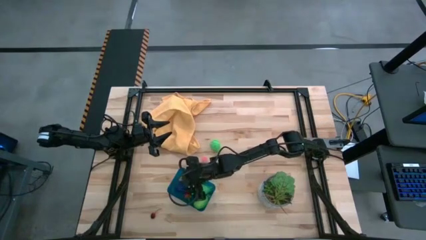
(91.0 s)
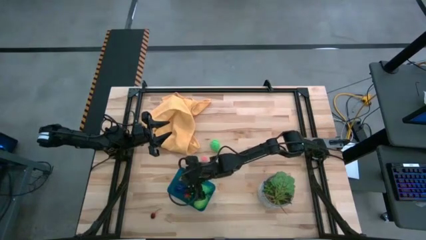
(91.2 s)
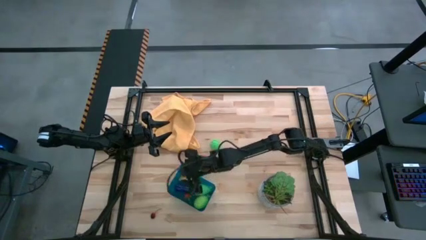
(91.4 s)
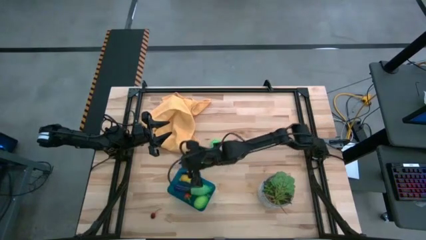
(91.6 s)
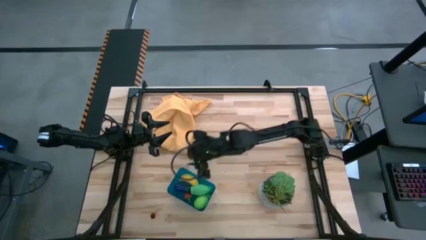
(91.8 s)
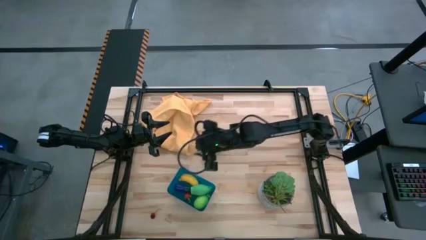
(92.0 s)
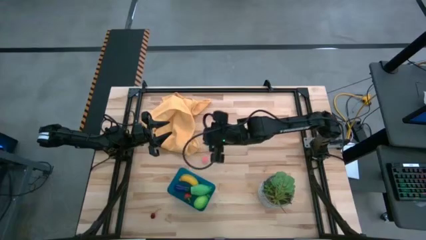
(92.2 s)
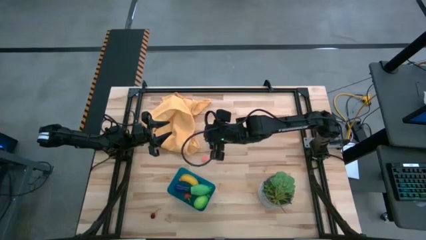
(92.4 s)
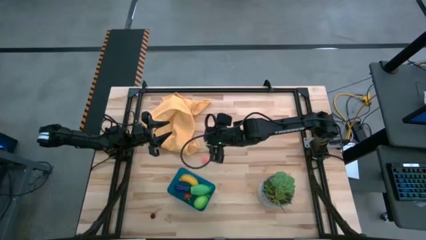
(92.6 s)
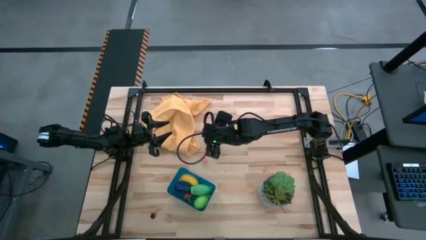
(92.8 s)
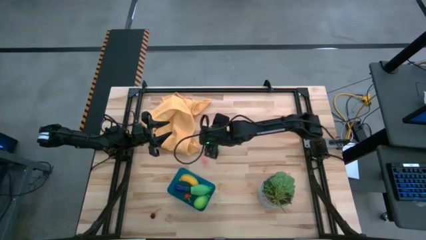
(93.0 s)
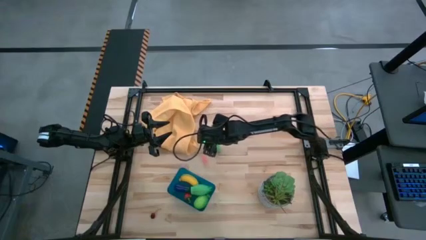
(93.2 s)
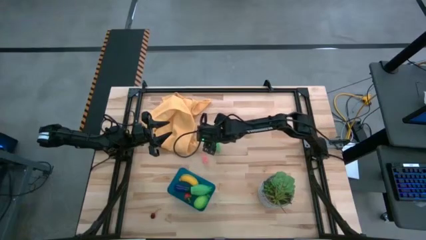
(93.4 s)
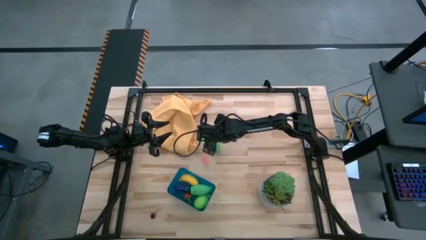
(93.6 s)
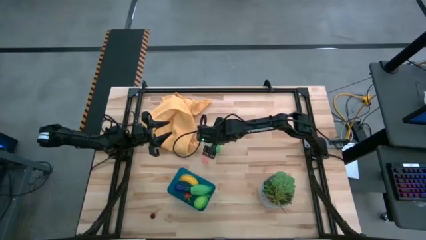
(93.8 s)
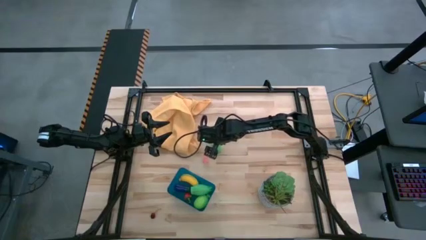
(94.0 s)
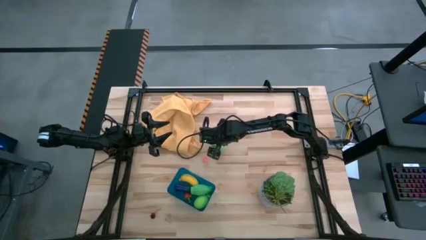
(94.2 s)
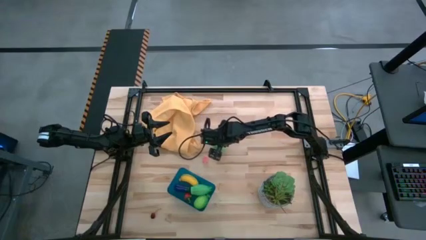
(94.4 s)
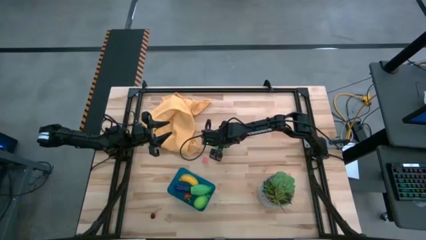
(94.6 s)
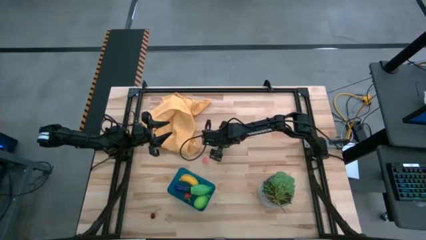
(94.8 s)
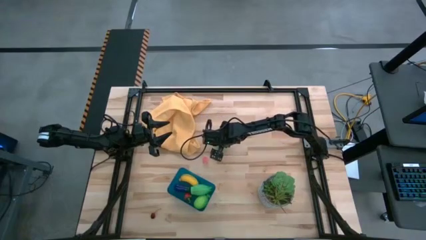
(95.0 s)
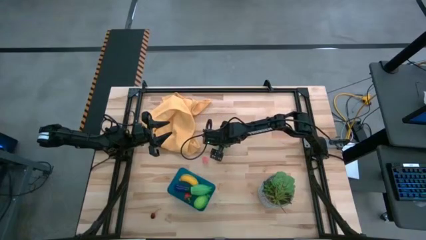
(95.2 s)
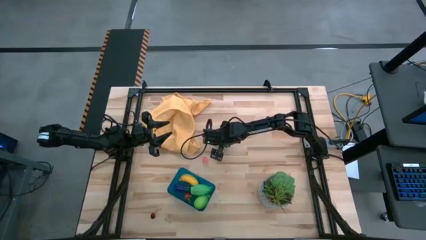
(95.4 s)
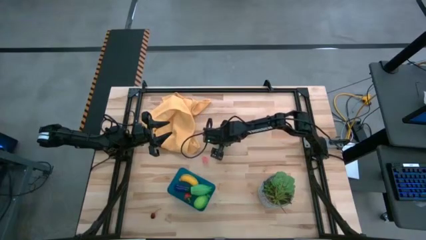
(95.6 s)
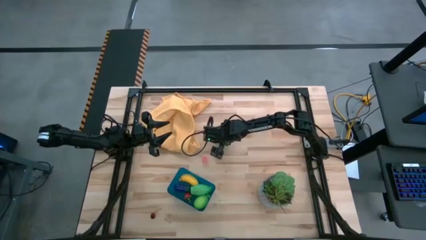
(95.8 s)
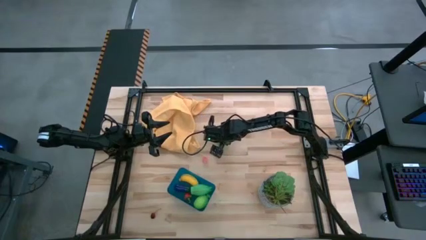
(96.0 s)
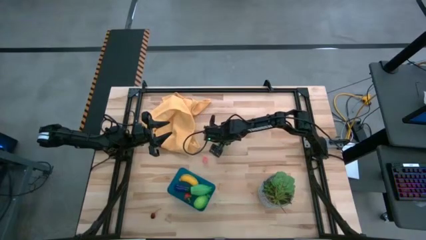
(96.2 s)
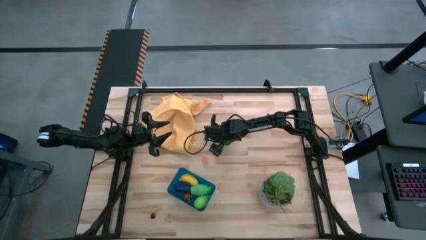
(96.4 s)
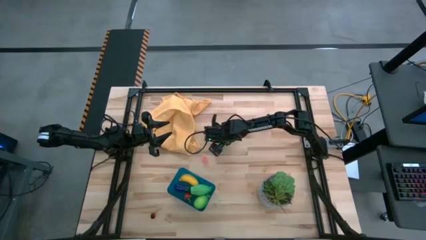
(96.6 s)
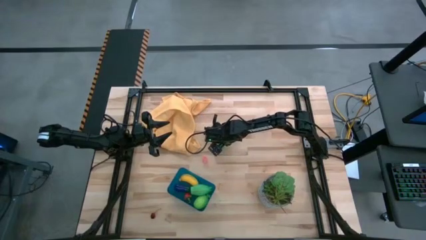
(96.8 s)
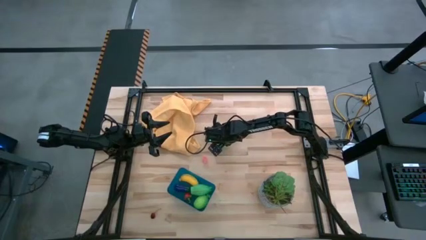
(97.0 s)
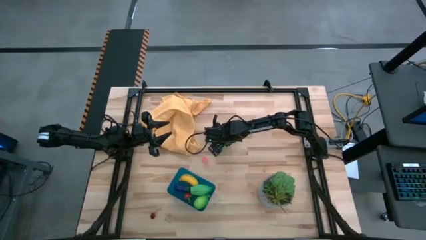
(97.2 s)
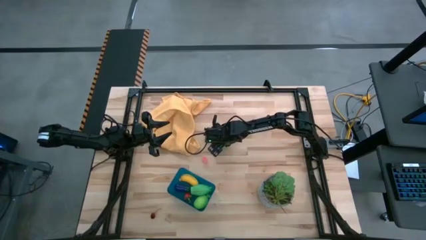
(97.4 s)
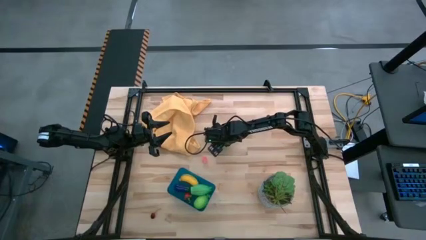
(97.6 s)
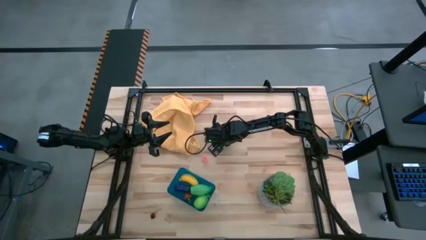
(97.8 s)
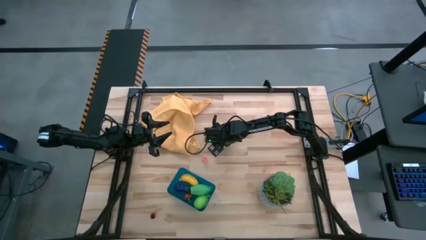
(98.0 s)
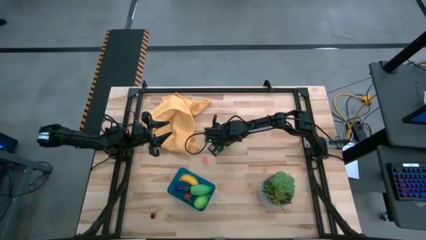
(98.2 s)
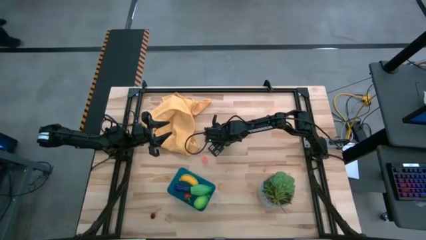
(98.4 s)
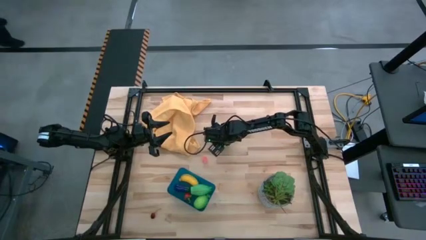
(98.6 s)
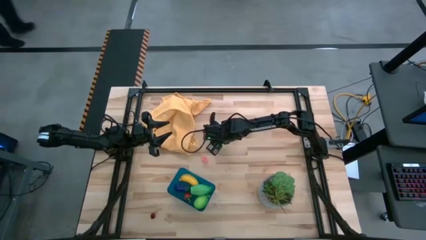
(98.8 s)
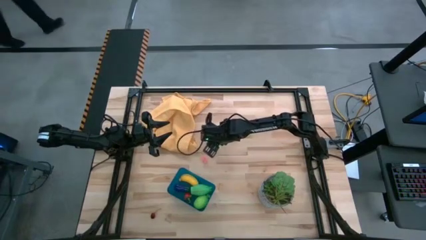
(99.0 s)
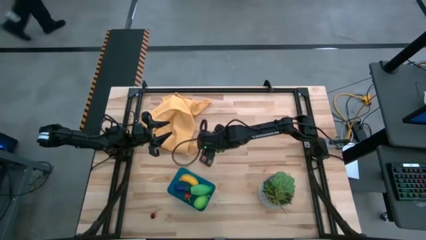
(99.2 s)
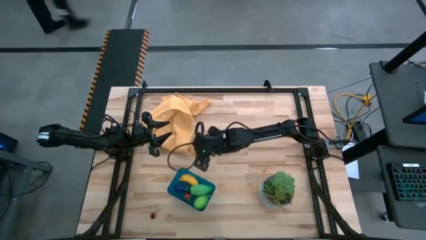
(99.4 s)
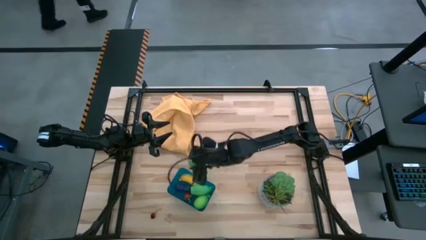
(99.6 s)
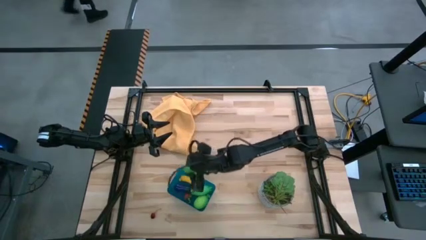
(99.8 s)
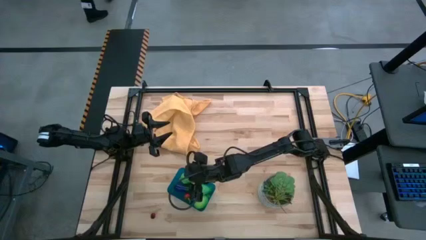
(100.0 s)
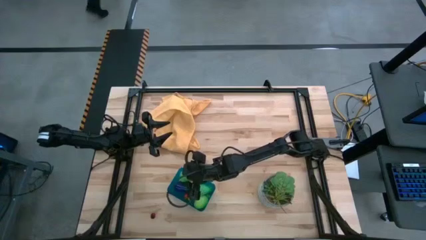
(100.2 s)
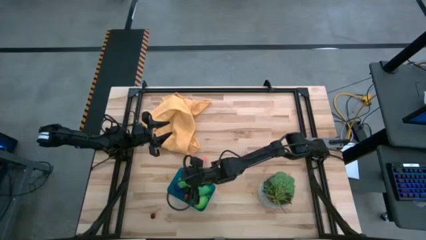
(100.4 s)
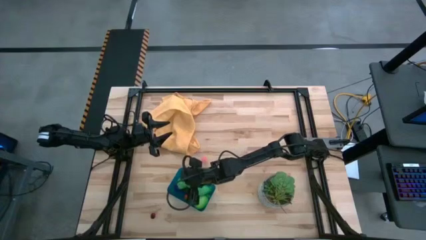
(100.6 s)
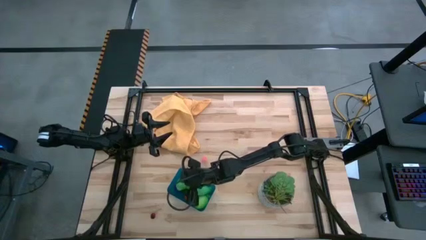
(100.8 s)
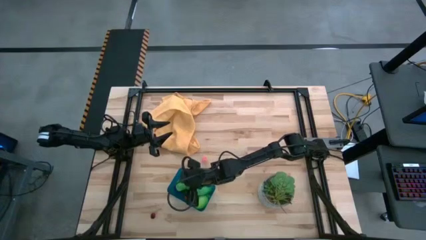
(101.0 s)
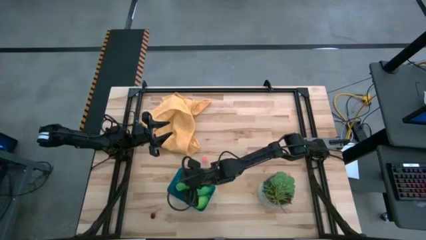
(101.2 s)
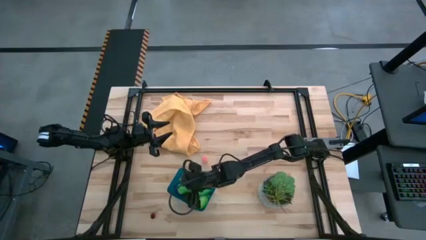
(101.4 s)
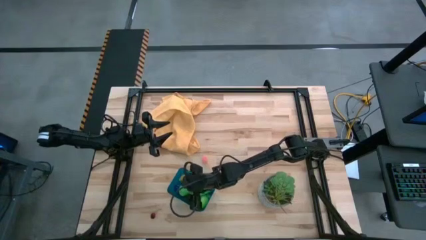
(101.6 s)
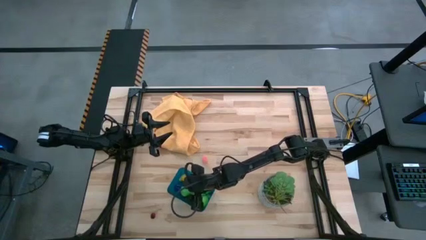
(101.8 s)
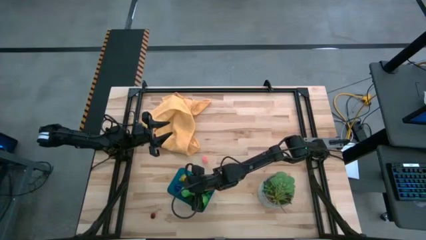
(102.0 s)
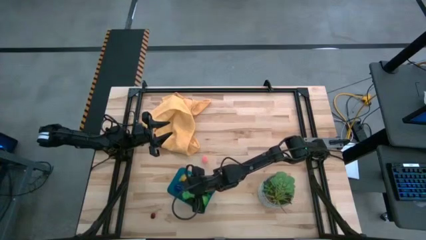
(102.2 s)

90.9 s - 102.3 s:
Task: Pick and placing Produce into tupperware
Put the pear into the blue bin

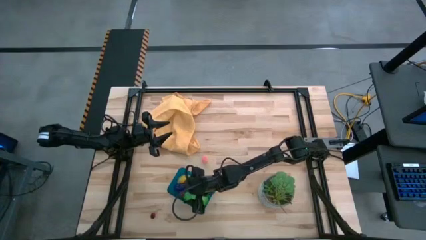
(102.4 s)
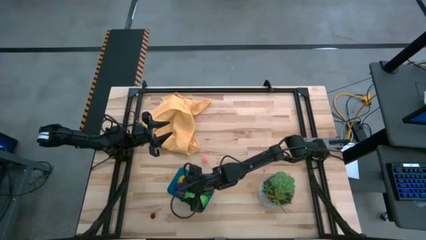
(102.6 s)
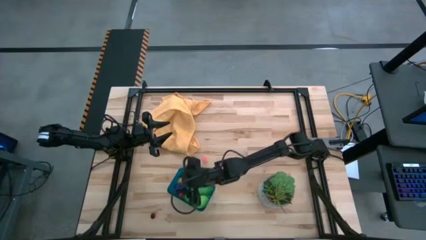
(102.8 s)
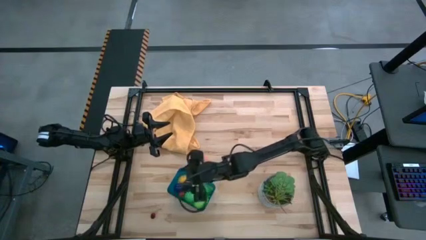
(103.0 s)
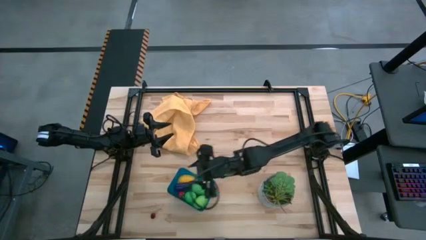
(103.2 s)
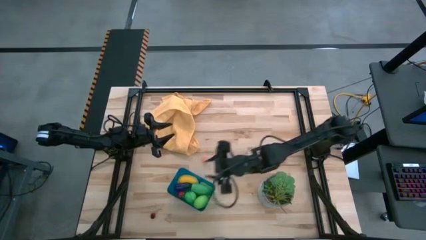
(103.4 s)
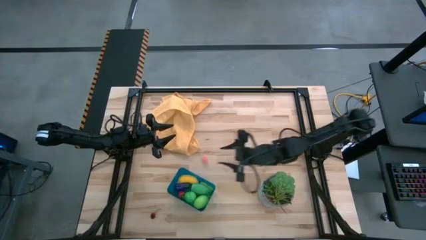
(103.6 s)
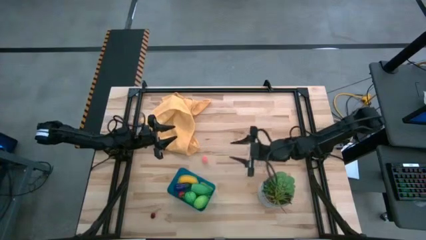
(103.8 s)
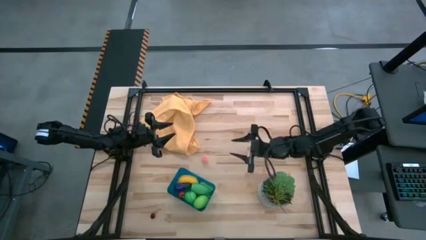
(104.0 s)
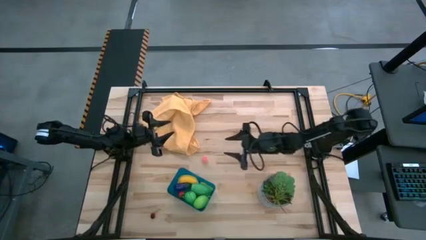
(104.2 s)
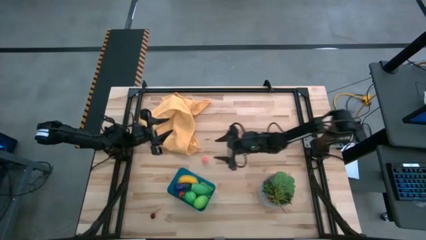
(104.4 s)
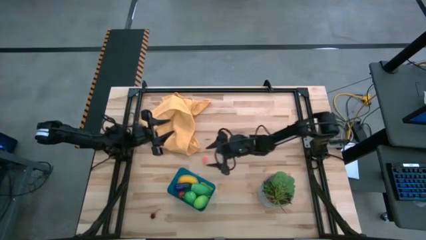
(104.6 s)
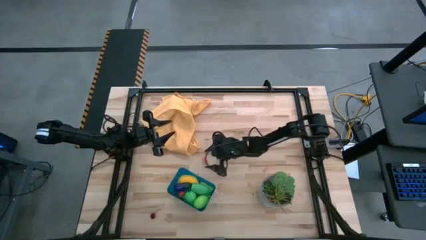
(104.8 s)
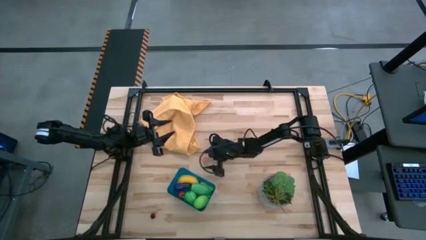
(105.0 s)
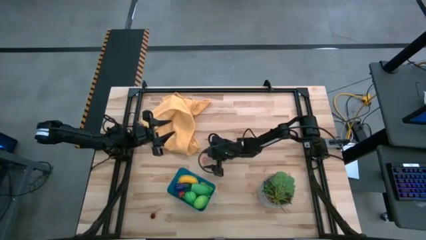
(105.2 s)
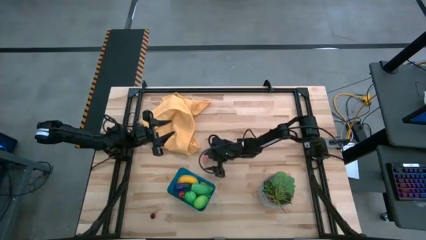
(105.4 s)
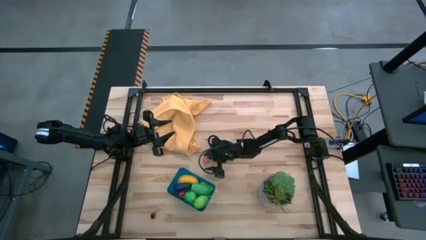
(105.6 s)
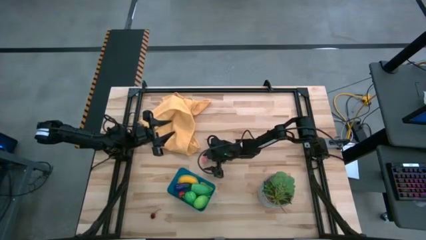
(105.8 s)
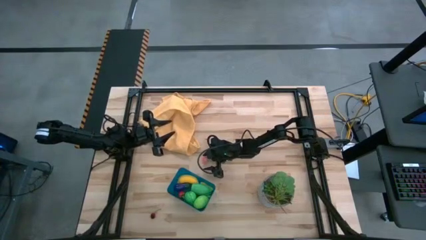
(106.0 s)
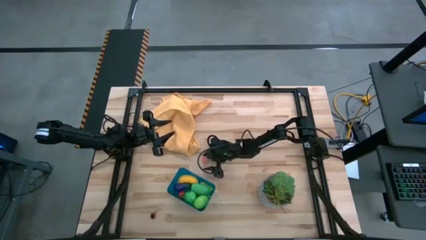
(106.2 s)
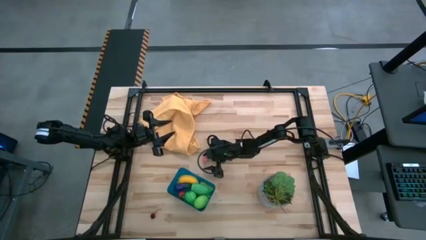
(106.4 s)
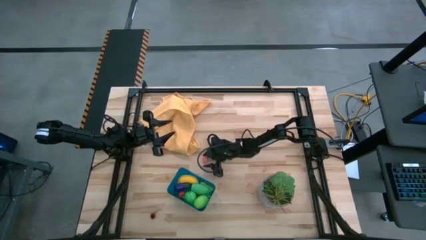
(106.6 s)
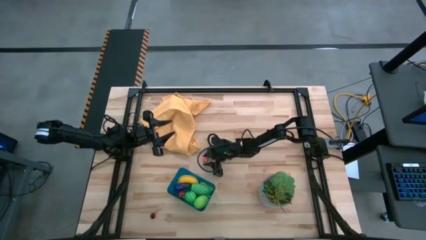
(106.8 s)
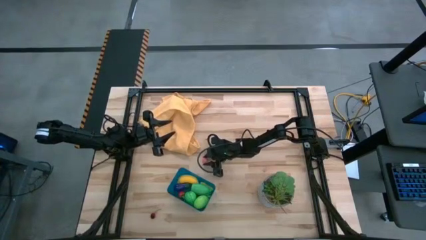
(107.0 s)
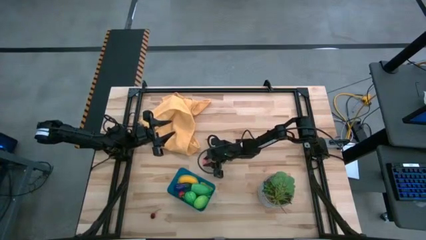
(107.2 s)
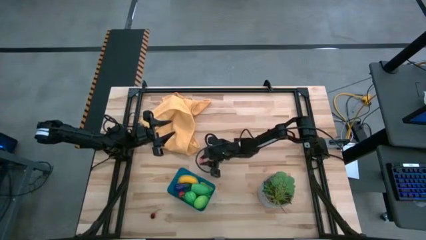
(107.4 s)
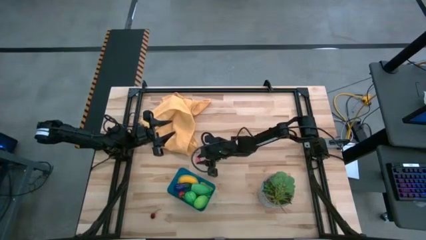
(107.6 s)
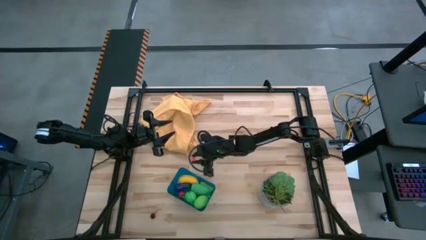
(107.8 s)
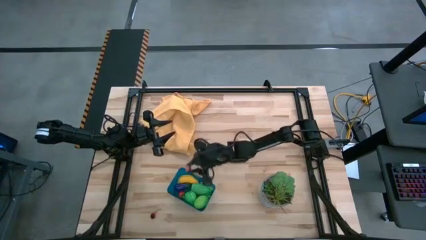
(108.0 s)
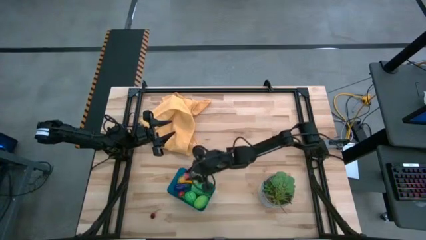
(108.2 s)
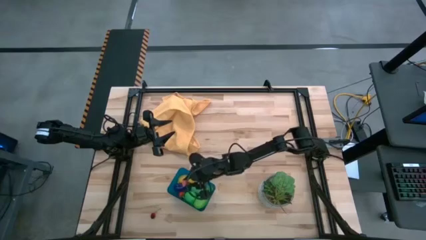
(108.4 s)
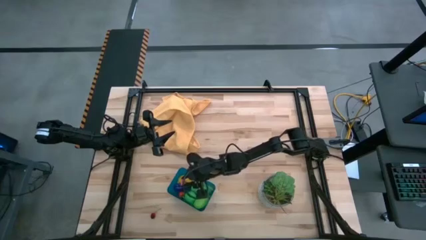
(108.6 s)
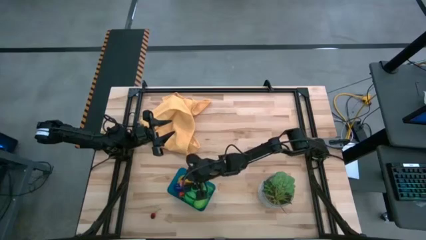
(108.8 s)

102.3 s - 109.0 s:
Put the apricot into the blue bin
